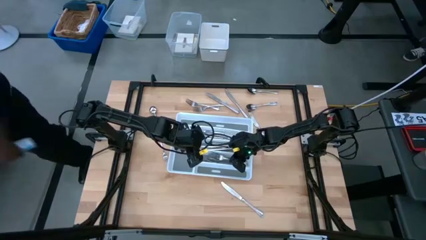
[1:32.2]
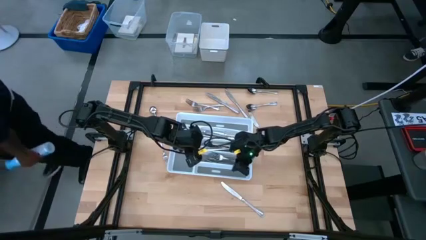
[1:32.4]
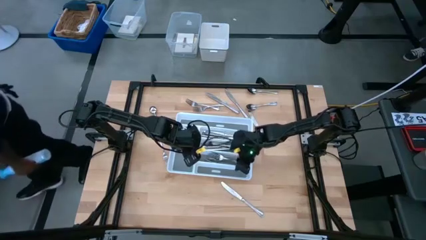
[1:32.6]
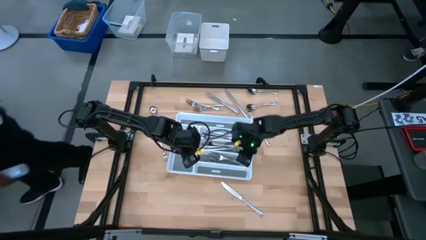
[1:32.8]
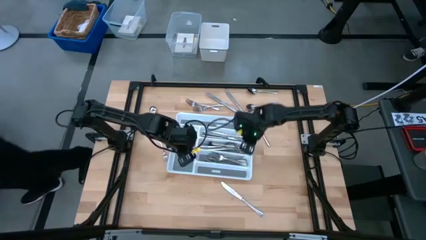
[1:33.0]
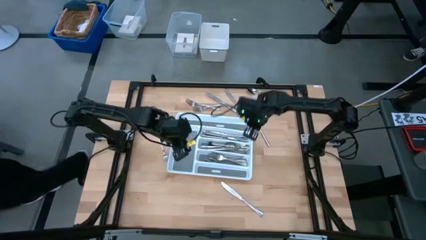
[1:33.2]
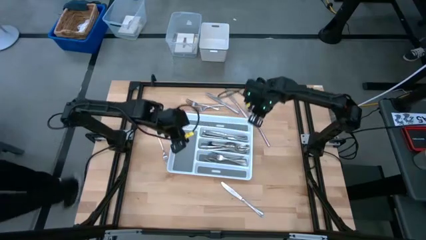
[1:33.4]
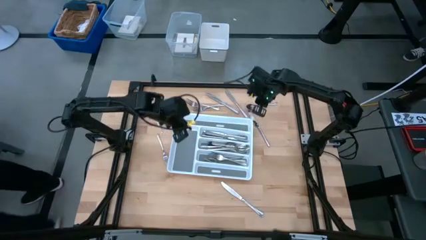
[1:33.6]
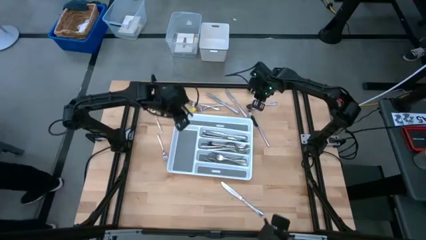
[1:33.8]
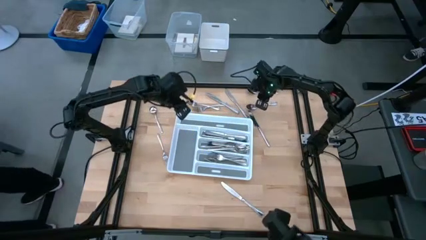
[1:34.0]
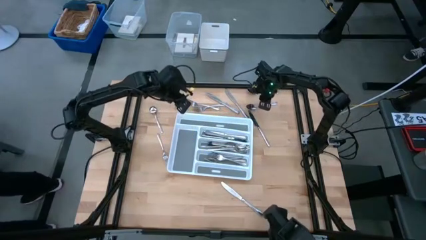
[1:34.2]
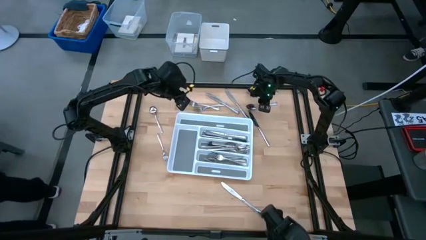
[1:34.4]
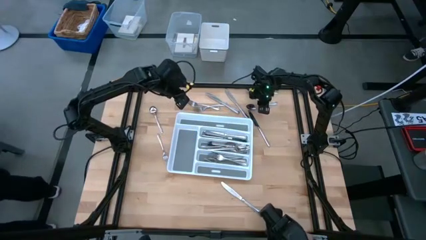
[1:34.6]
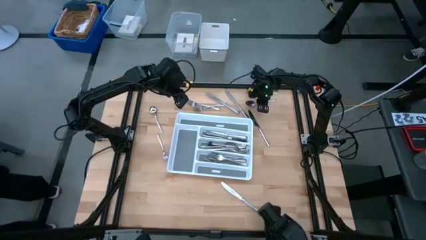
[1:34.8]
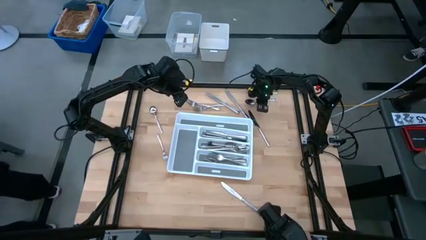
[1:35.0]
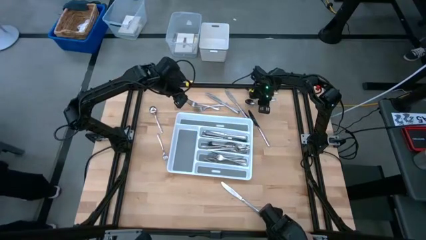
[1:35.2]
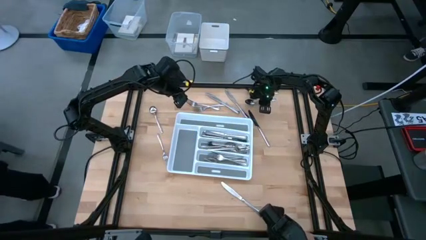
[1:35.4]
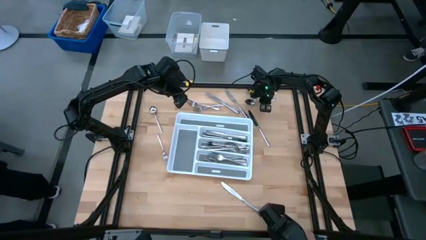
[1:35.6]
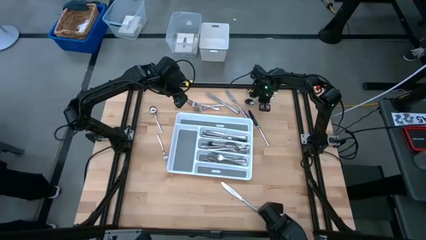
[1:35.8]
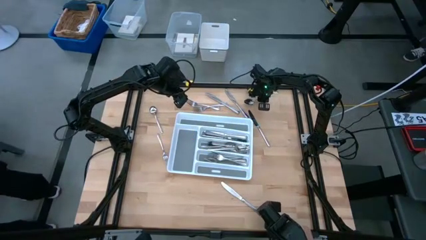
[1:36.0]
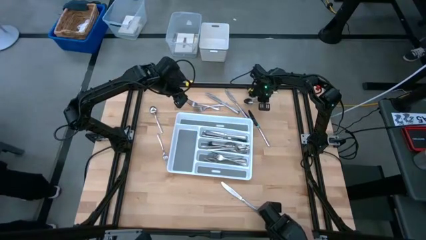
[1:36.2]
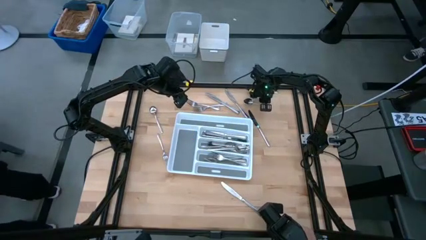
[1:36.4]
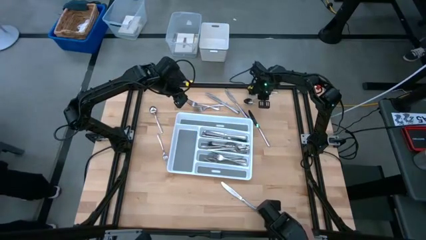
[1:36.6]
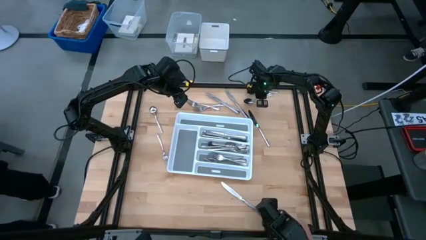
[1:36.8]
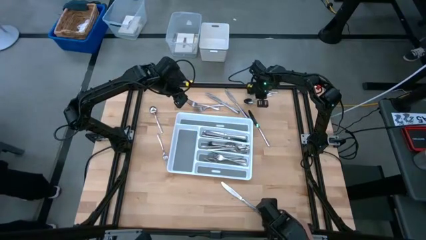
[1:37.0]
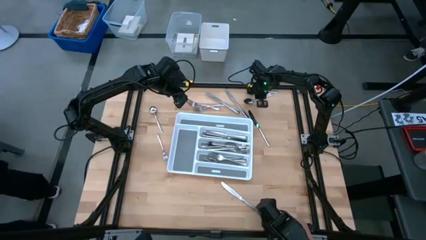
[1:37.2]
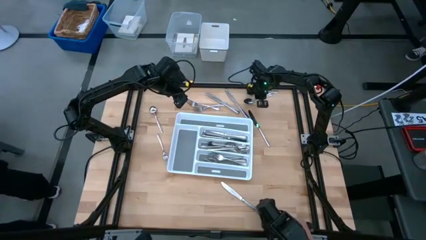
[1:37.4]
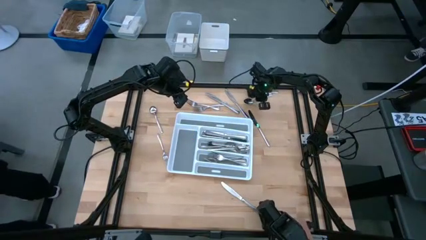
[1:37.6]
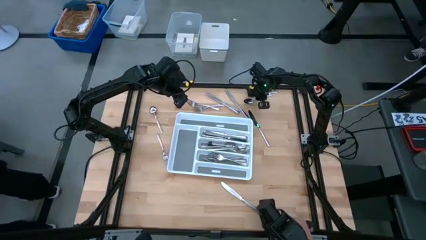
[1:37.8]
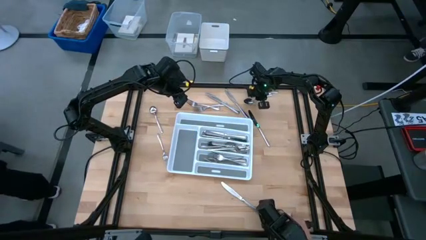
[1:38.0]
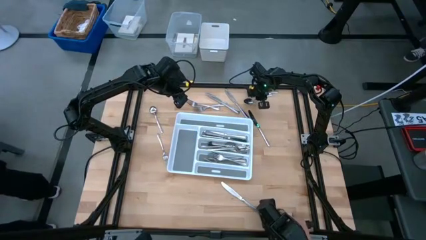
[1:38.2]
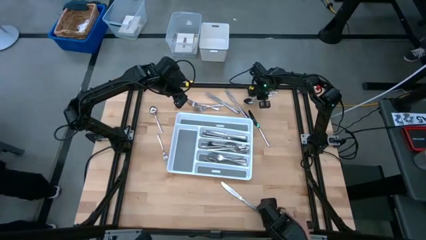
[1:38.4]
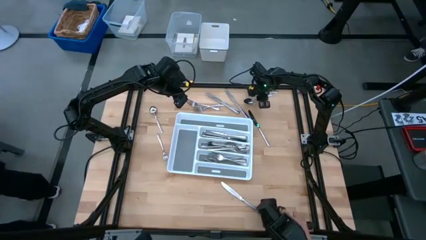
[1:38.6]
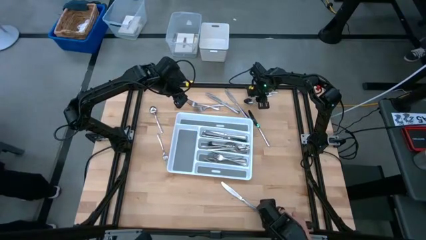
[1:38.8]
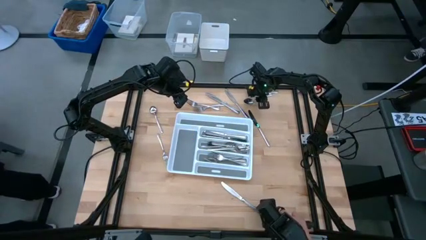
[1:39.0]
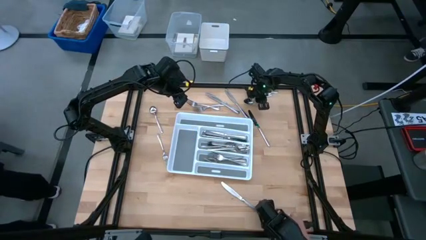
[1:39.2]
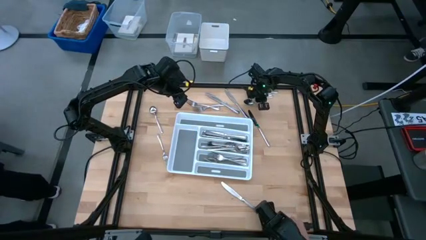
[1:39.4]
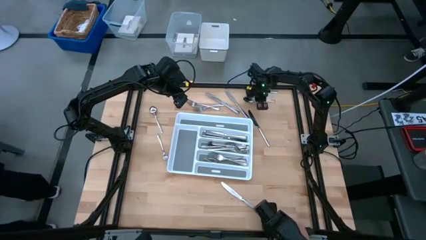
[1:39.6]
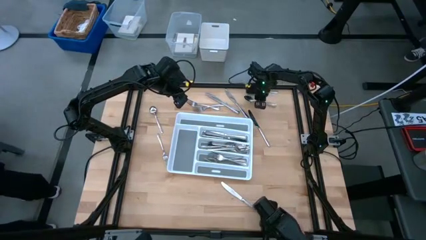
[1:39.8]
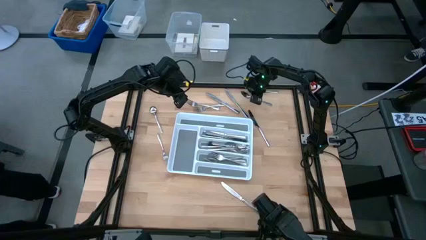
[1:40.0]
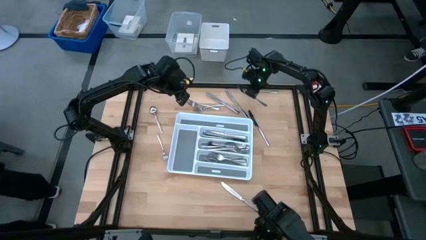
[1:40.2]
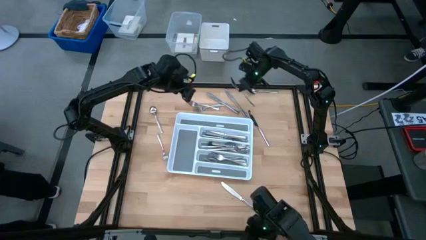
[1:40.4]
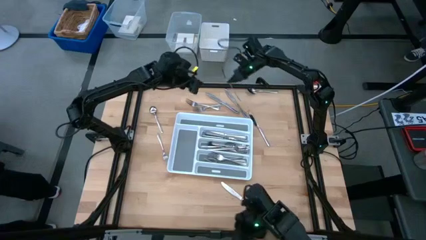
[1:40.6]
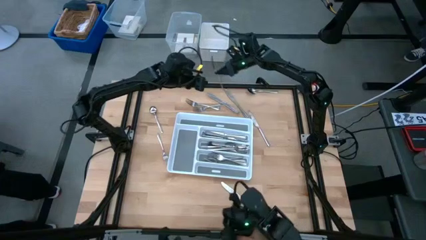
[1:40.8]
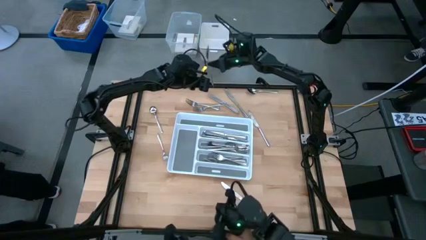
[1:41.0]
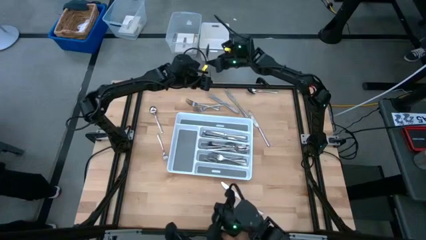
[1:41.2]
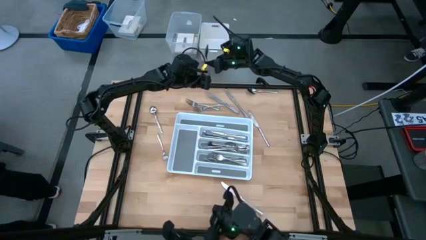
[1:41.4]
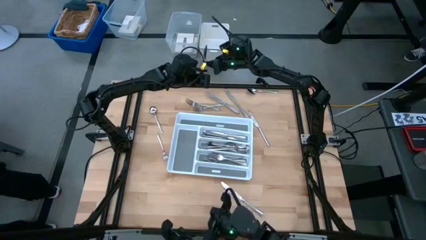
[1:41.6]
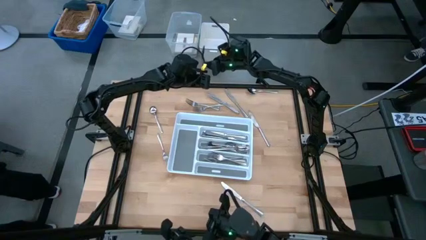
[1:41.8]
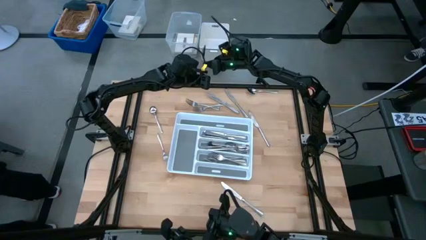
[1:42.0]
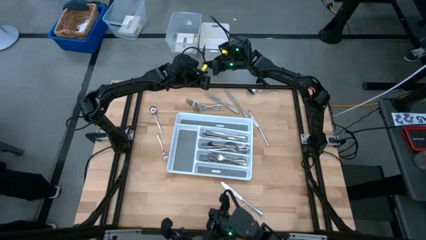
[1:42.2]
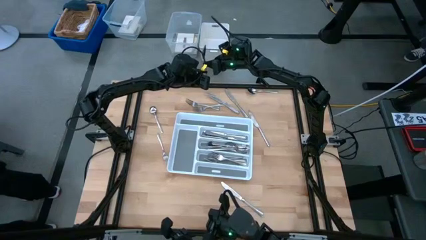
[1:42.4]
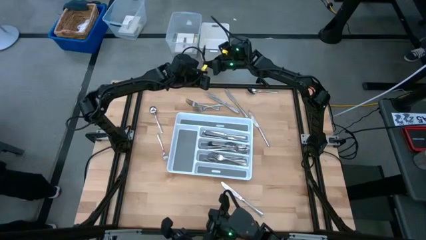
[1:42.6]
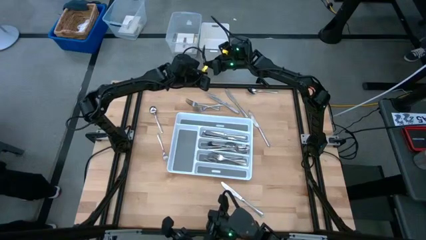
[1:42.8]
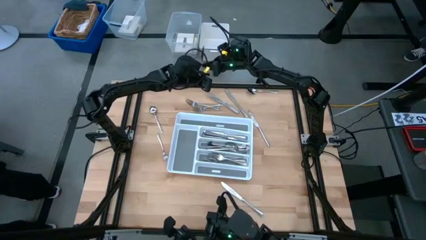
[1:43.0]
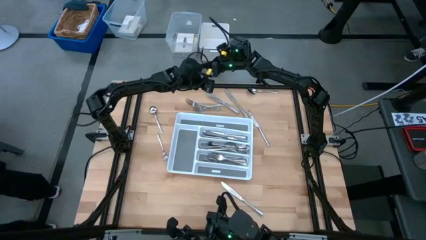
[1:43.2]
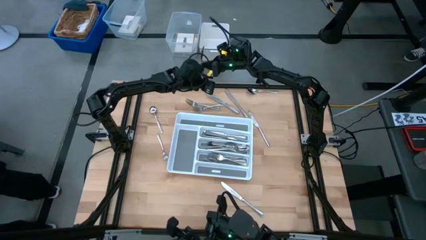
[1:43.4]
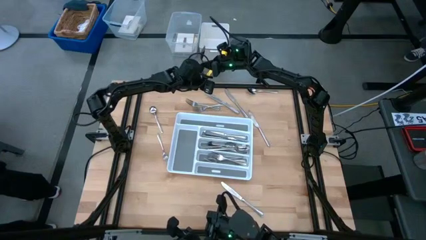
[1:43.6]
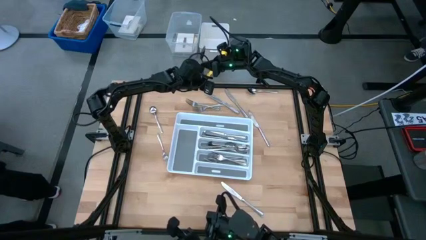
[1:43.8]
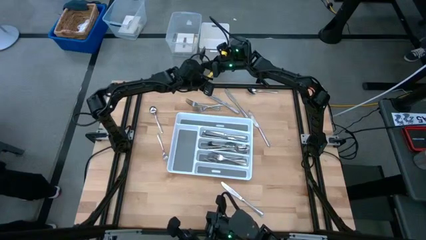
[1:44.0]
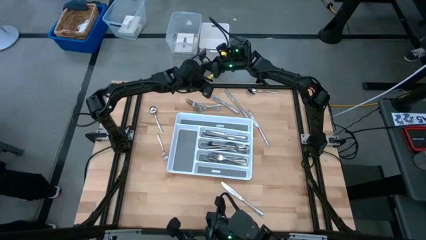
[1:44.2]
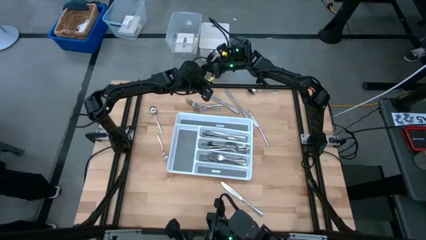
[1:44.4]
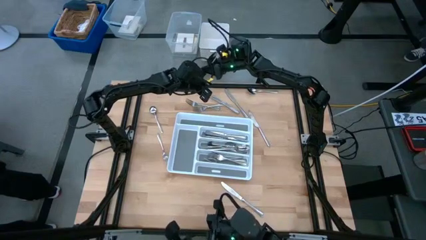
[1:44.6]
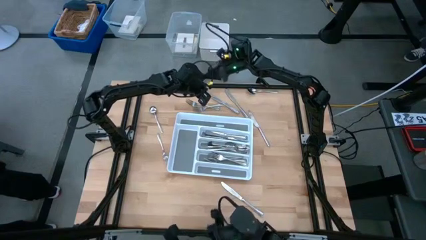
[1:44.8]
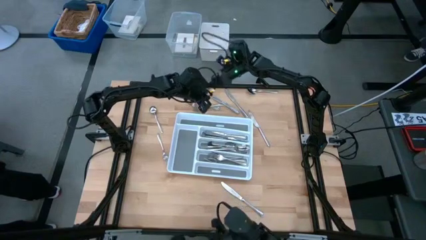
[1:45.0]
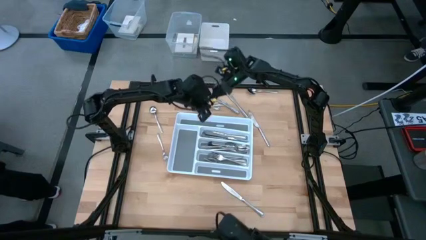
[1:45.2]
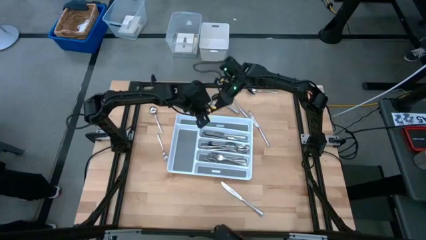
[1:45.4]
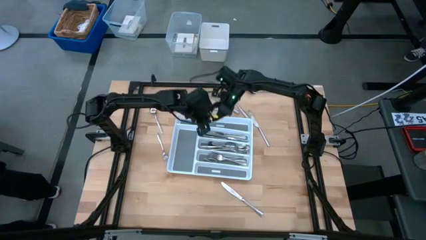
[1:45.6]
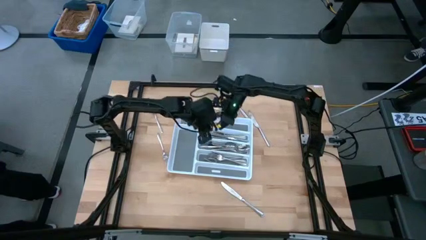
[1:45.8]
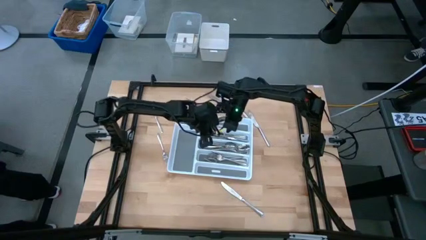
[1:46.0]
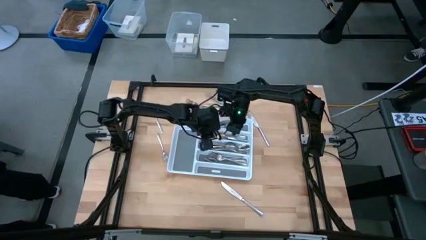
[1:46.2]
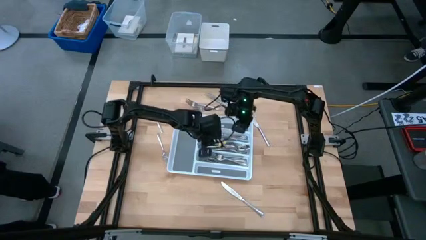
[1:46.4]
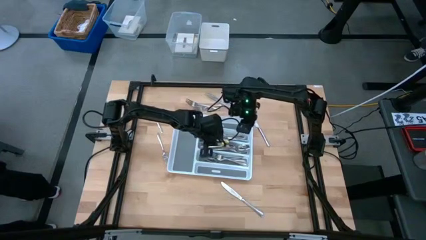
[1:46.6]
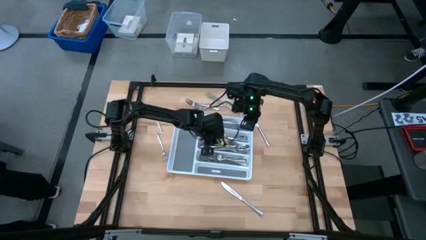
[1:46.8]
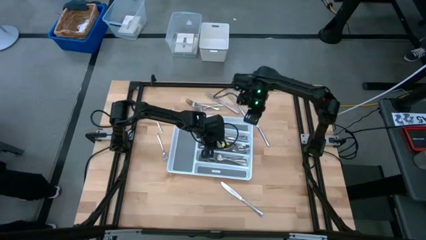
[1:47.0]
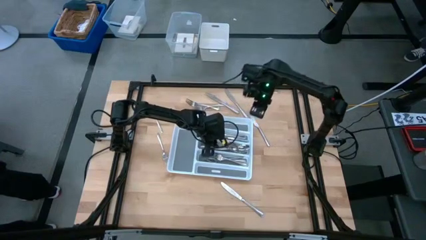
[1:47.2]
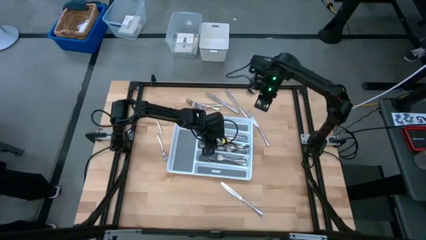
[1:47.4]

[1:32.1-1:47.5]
Task: Sort silverware
Put the spoon into the organizer tray
